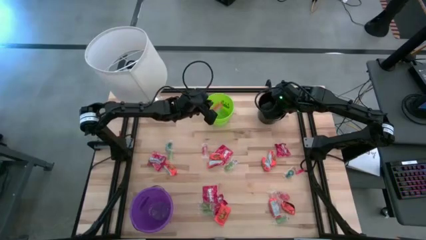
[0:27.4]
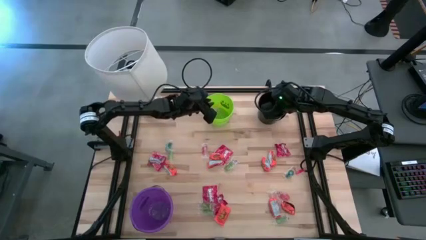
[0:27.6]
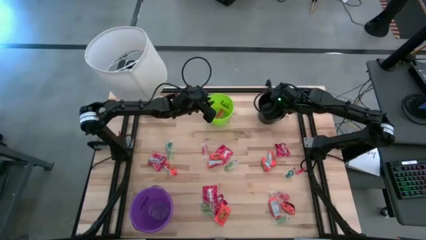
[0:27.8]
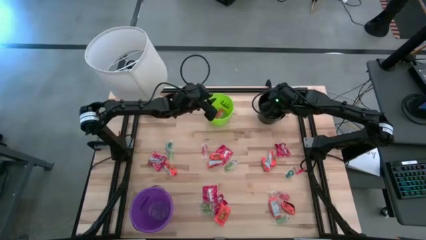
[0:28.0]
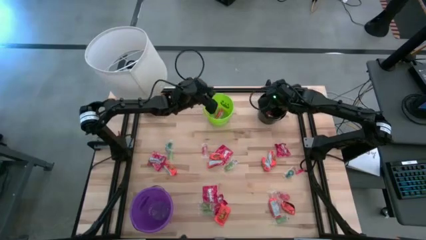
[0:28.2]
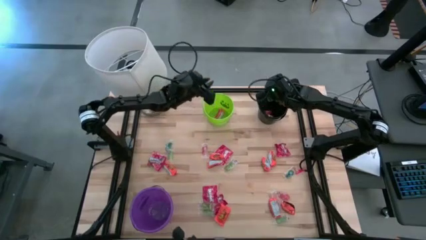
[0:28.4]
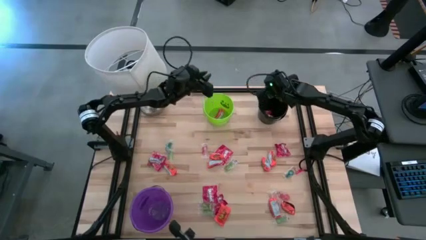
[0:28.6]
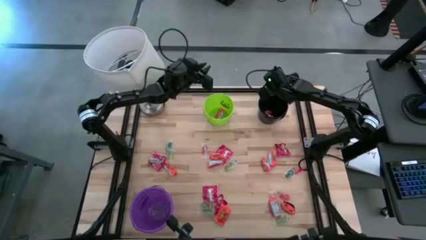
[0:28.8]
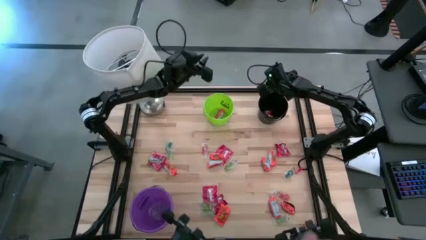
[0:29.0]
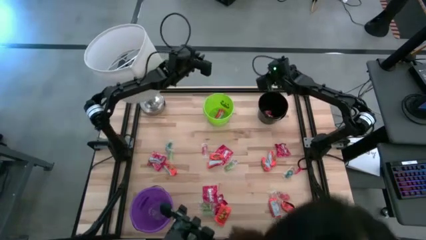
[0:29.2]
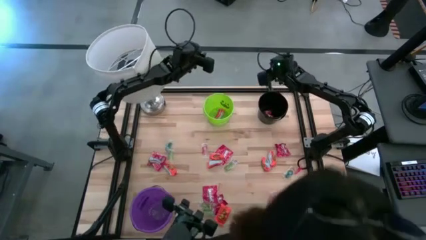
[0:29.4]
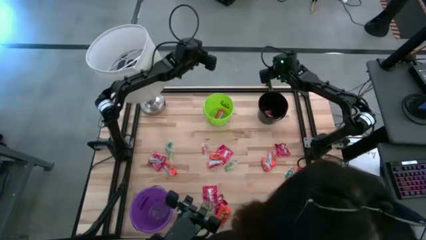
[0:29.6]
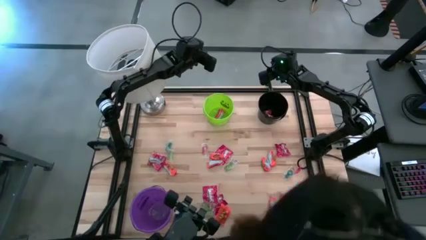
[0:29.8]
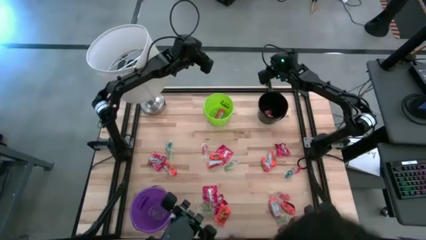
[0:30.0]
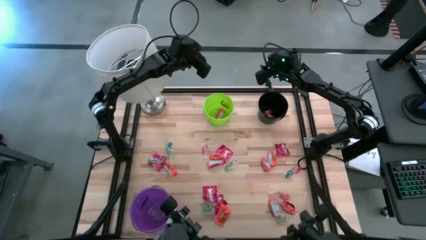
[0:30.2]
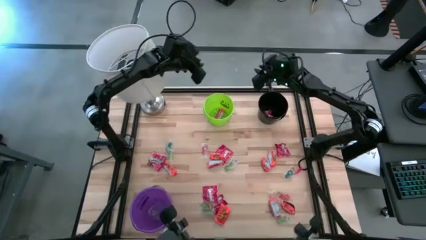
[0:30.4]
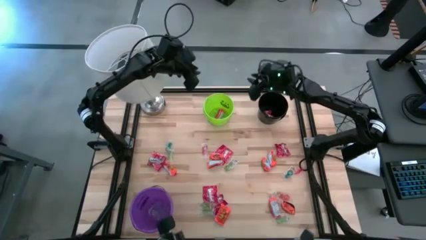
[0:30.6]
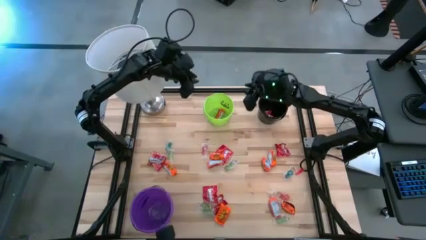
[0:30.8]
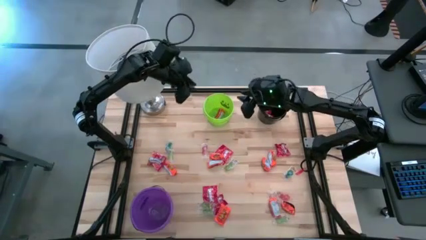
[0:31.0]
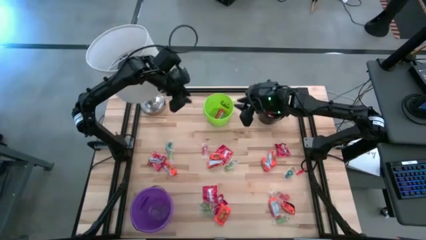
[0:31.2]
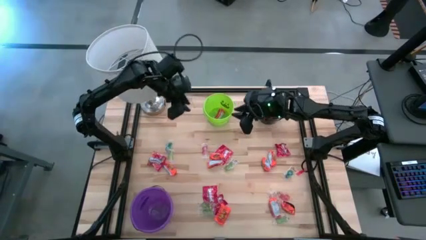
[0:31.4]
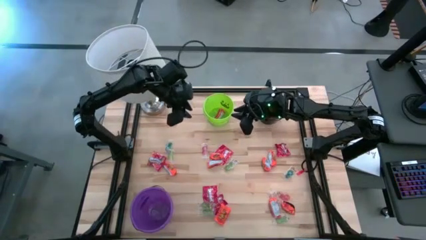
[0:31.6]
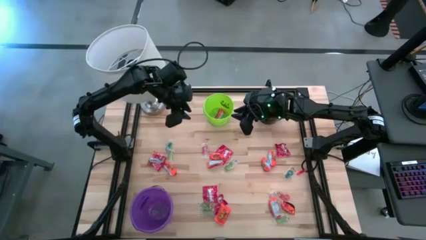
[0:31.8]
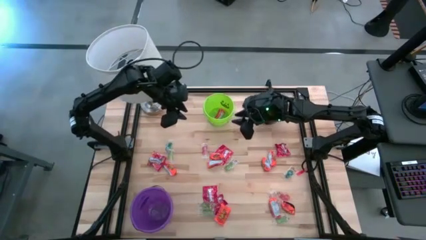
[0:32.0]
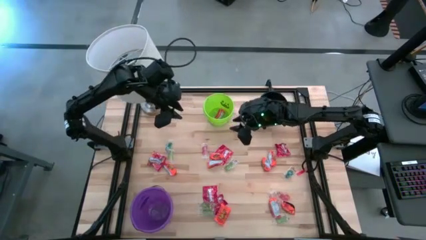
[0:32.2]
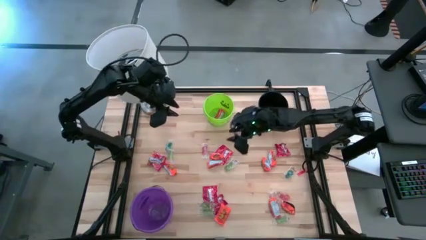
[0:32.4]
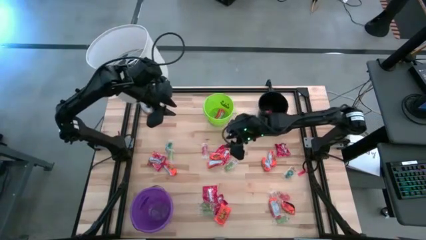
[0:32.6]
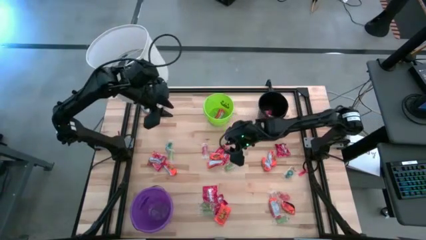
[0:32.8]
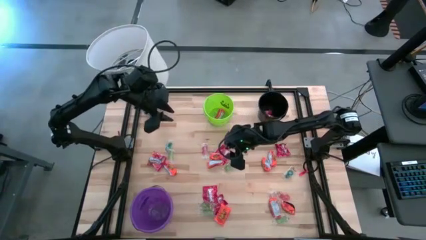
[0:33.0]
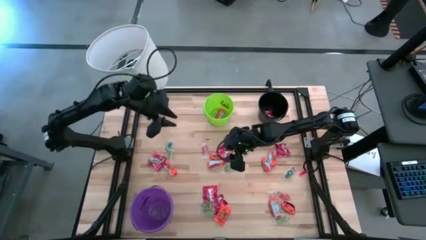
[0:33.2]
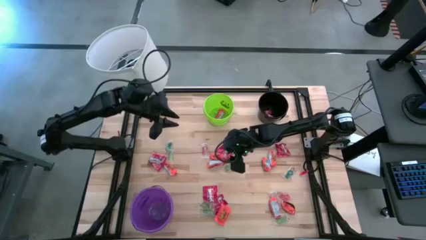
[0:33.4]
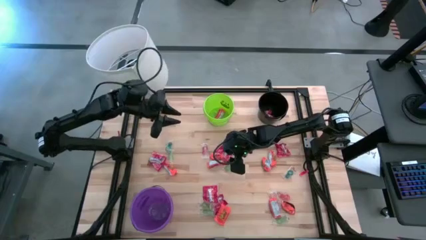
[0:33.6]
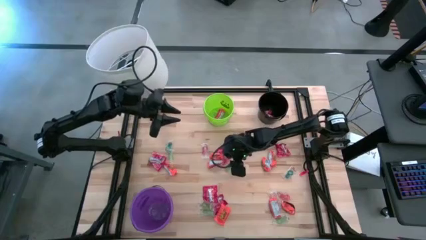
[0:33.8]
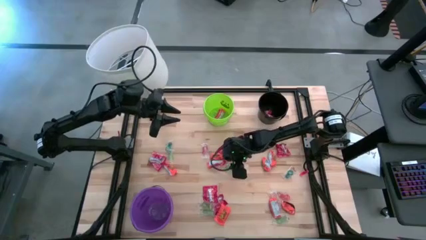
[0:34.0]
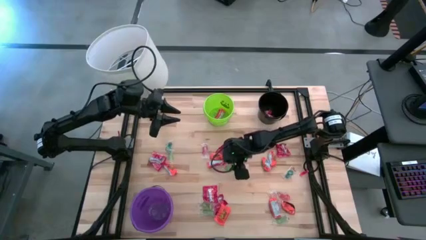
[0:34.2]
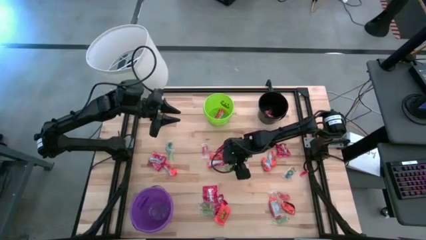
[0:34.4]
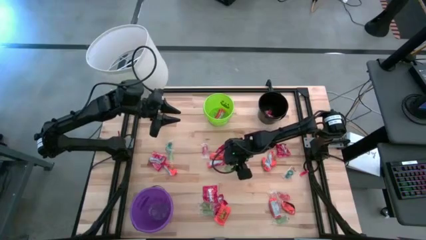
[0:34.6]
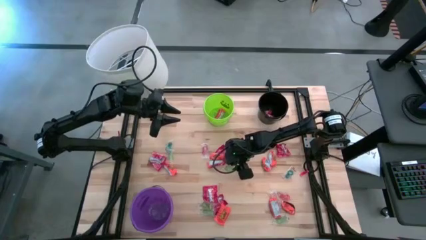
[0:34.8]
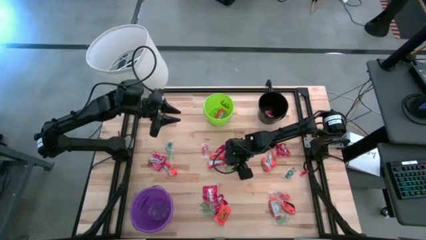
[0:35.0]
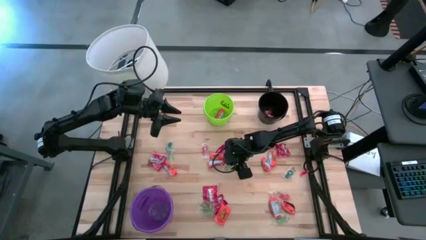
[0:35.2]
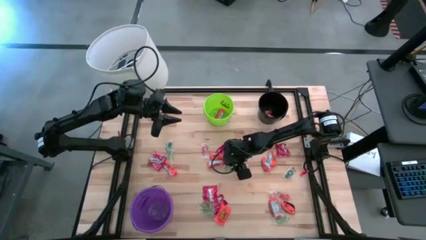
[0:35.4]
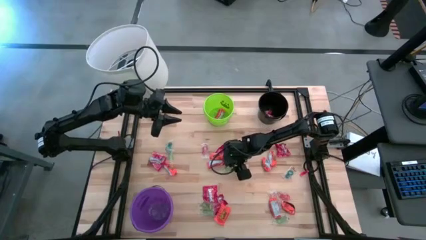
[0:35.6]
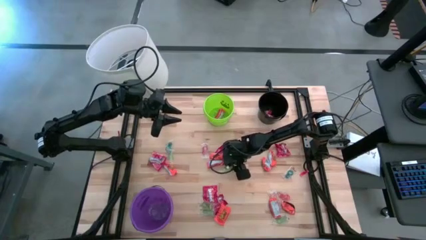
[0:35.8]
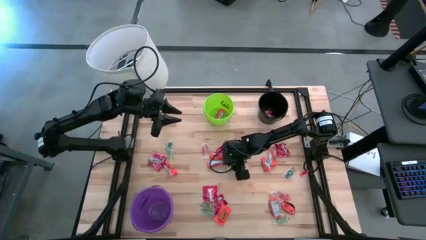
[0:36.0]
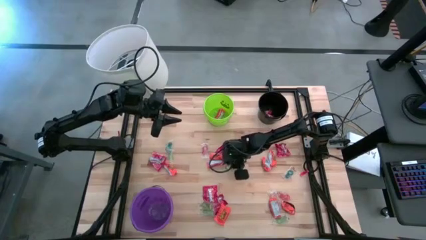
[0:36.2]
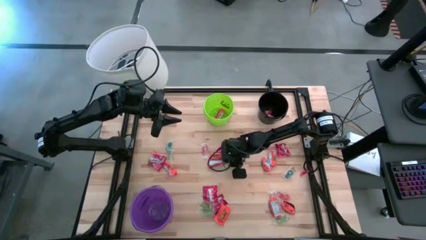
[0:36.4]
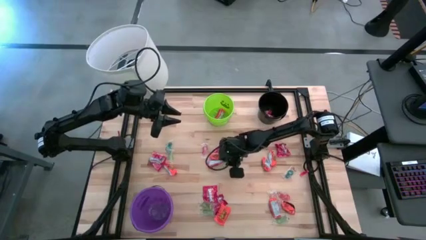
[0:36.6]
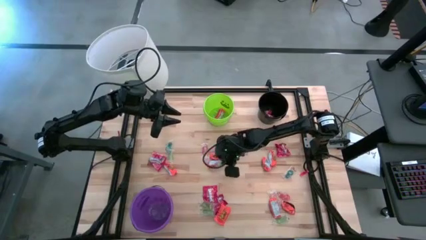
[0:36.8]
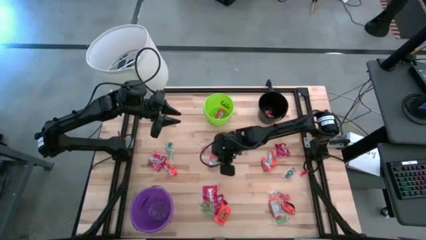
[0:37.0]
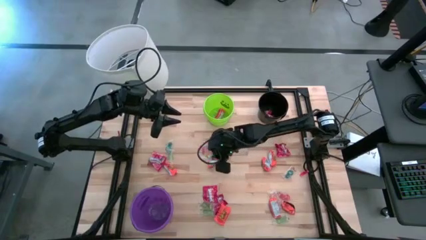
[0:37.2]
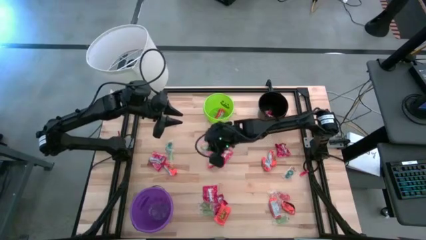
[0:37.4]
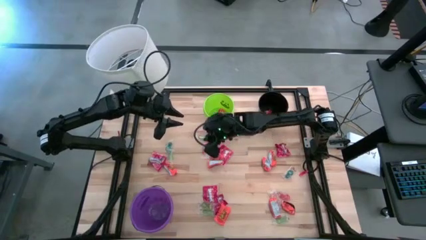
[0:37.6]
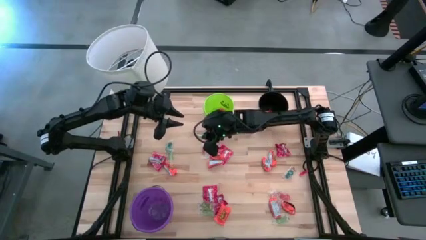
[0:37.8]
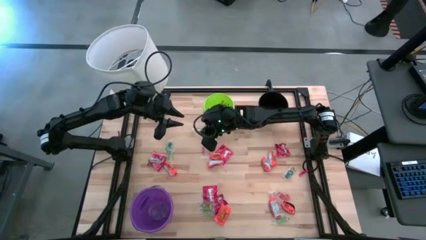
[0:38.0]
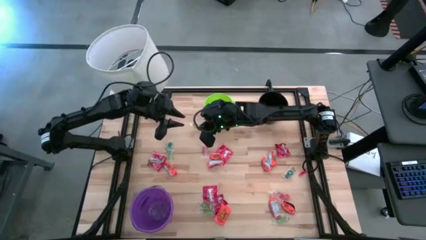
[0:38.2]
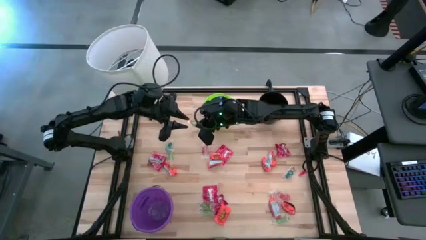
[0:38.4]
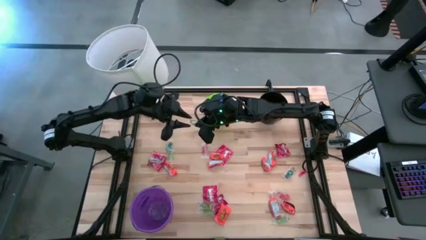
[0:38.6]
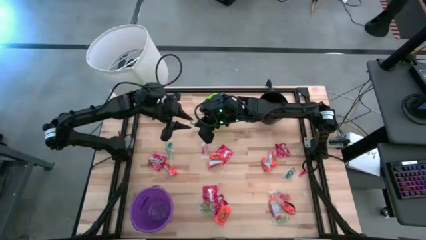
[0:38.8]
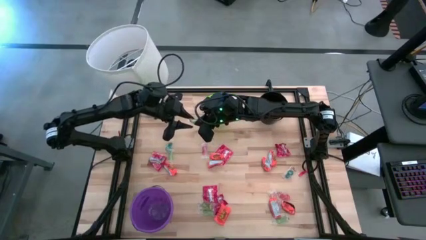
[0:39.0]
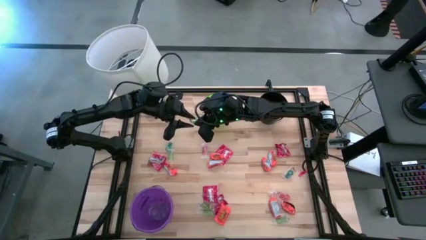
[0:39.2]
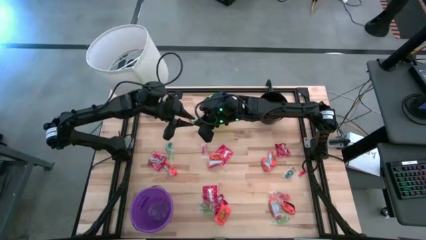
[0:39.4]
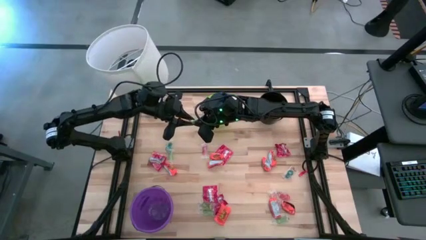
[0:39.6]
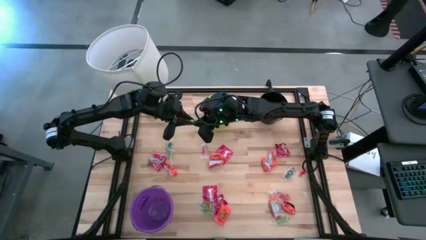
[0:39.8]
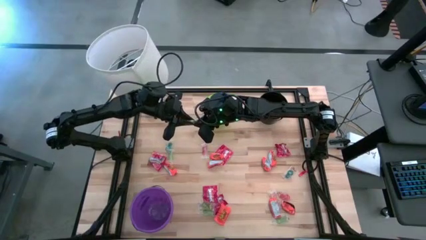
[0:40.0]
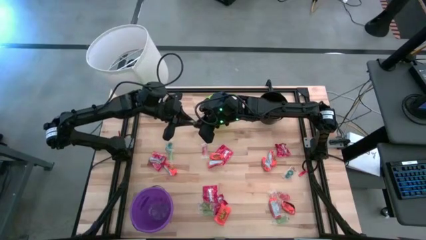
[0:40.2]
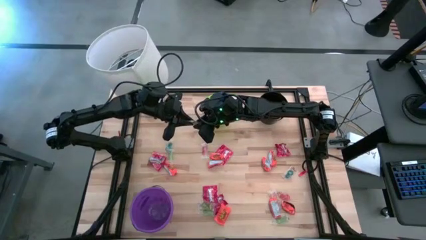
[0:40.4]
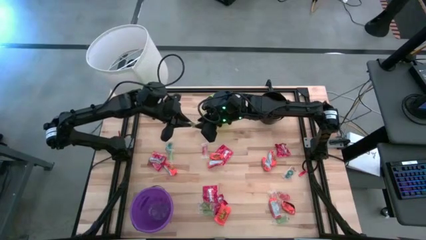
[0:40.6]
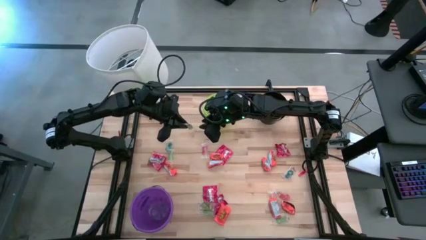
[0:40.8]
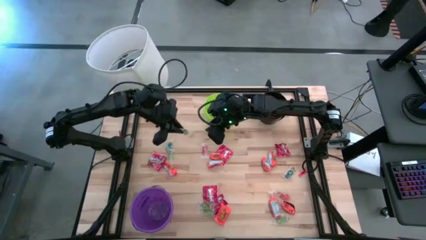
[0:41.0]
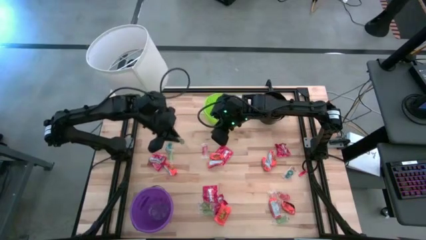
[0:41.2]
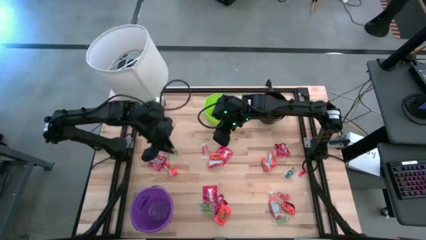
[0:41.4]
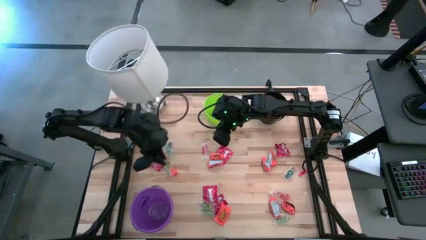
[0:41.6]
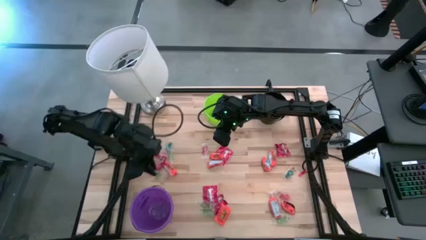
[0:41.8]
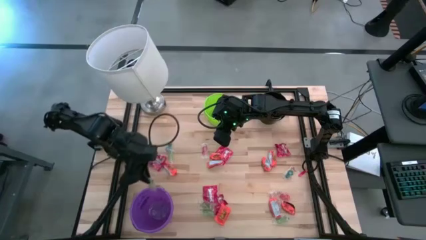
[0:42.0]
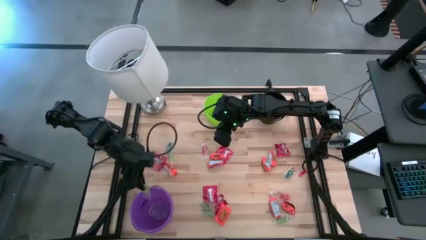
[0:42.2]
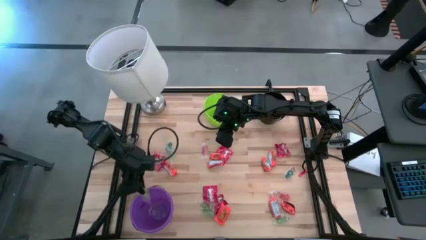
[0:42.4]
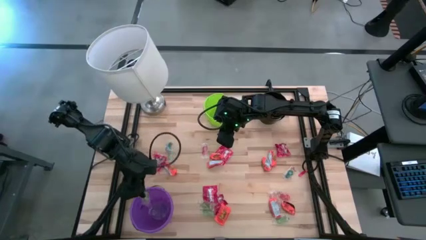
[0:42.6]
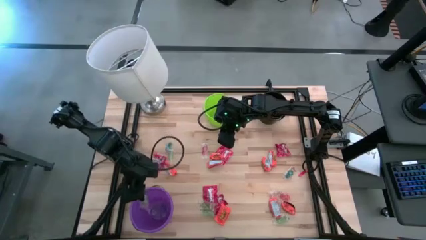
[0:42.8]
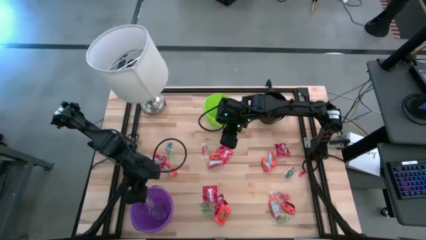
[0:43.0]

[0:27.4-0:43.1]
Task: Sort candy
Put the green gummy into the violet bucket

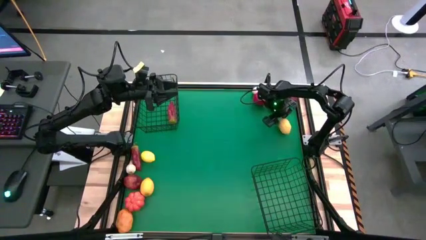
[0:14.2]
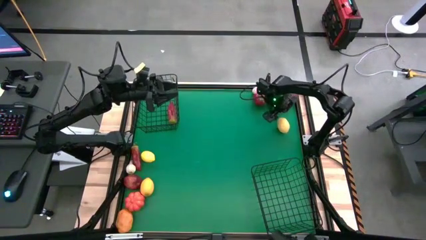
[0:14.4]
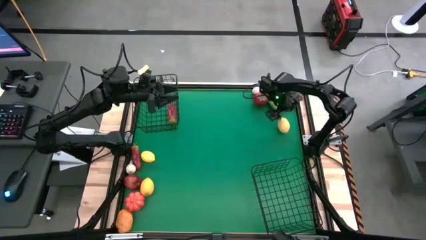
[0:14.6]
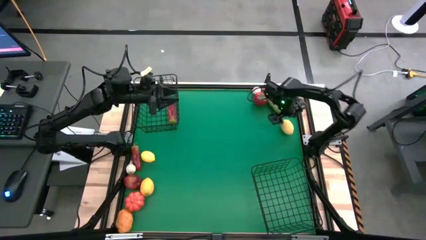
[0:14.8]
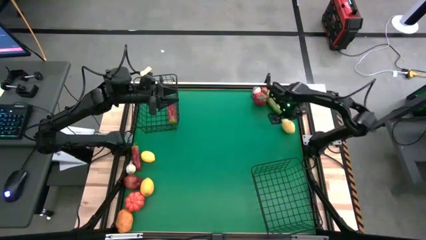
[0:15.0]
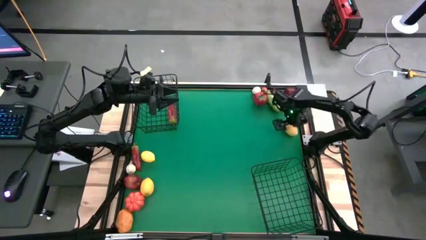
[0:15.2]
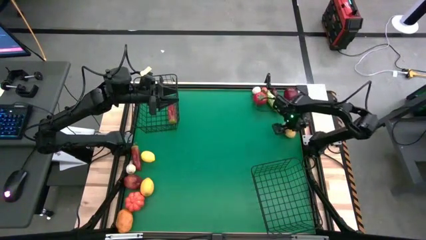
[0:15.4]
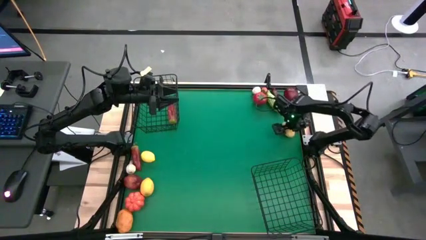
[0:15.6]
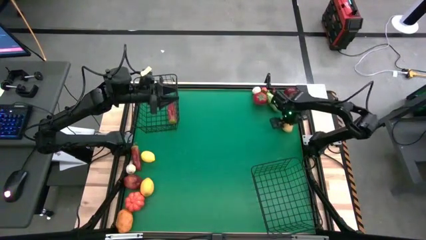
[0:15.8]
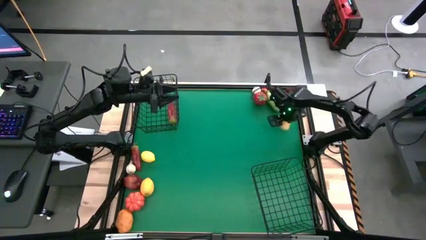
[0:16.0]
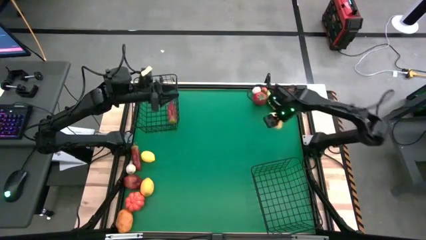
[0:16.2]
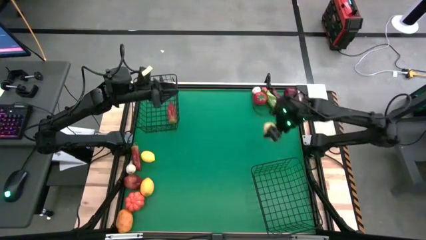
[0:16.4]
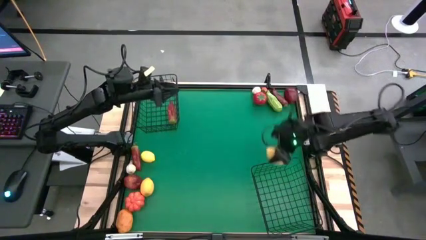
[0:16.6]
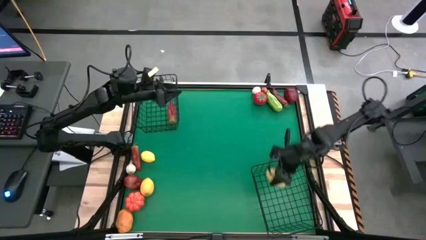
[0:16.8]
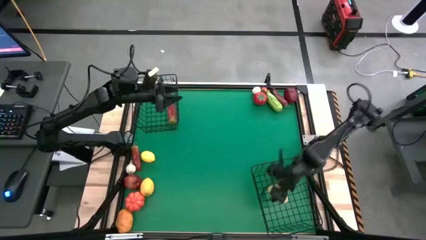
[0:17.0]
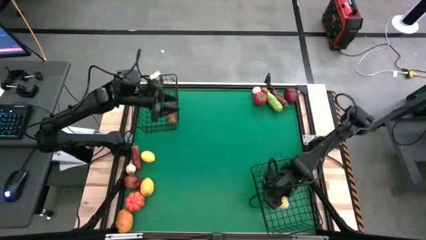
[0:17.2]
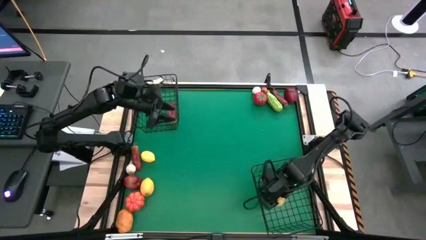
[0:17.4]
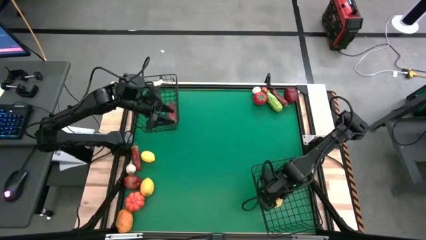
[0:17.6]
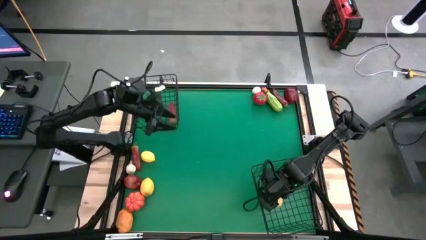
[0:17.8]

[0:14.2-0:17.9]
Task: Sort produce into baskets
Put the right yellow lemon into the bottom black wire basket
